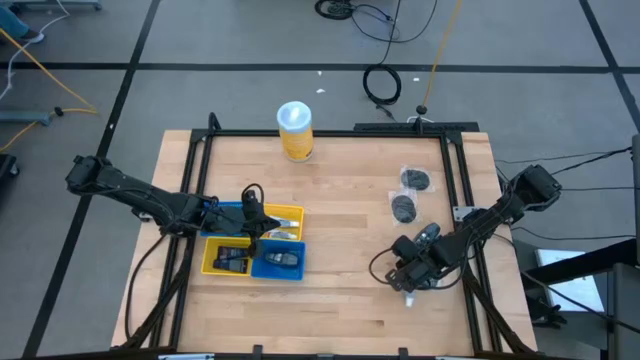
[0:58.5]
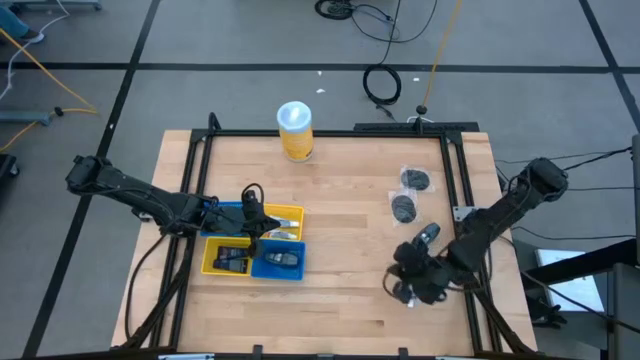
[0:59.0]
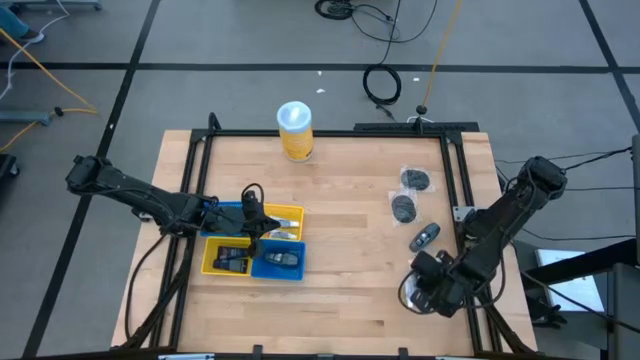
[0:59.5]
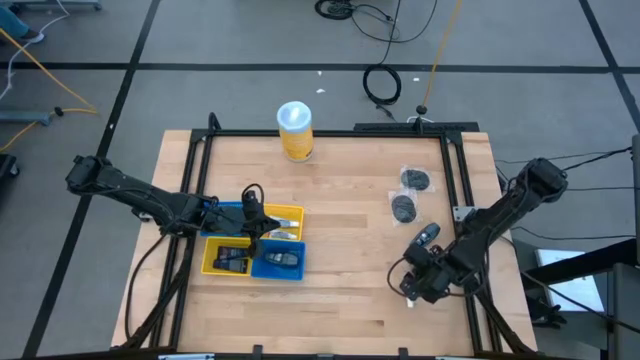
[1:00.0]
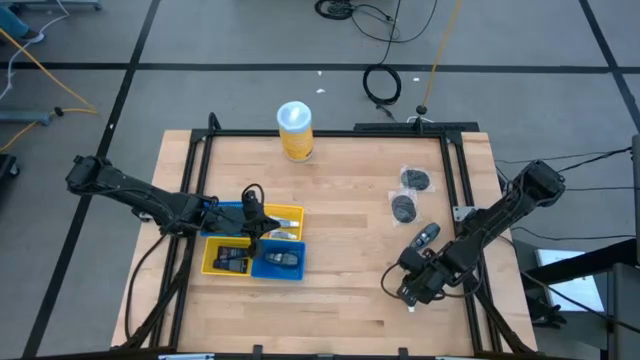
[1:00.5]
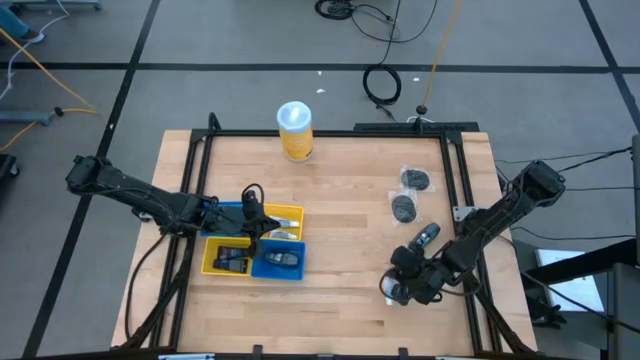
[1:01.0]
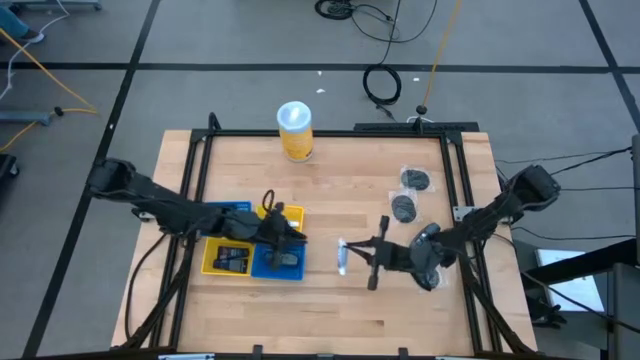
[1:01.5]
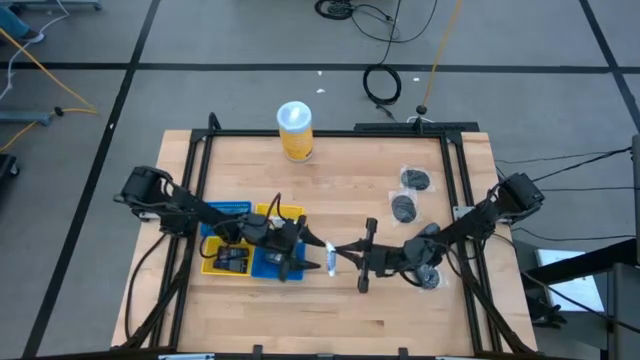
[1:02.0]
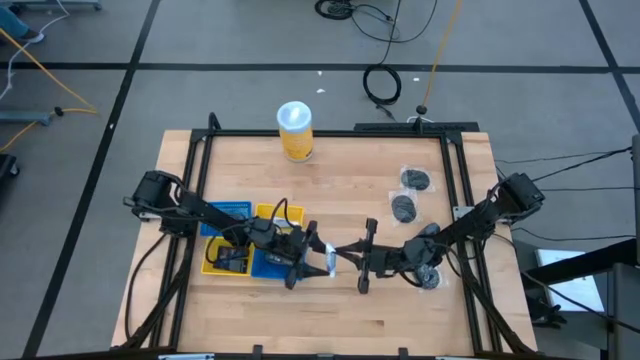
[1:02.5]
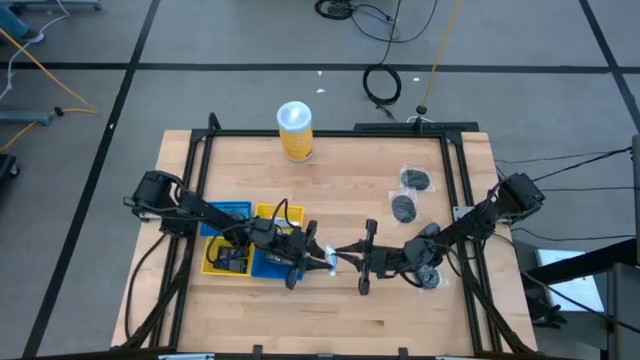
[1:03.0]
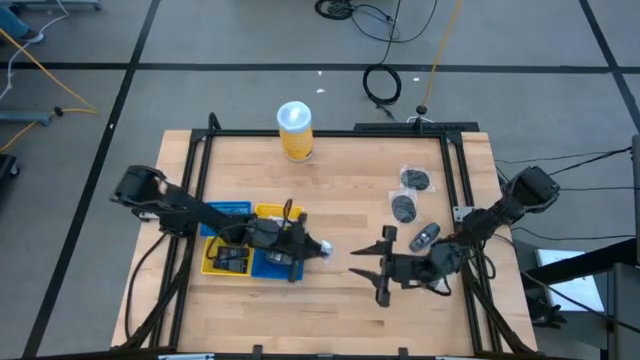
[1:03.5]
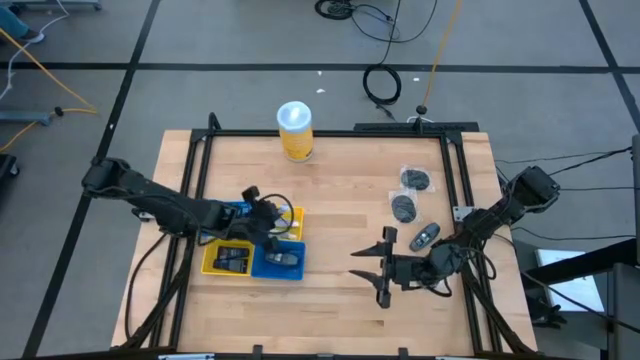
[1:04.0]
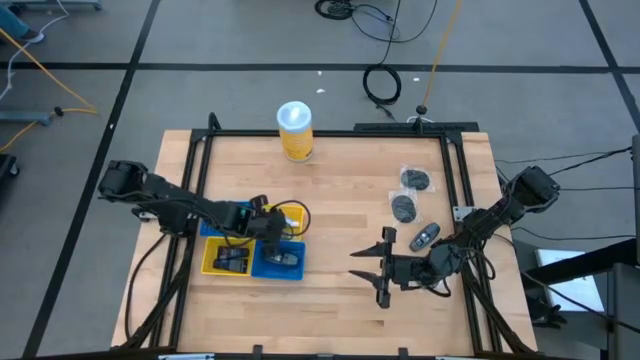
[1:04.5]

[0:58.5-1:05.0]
Task: Pick & Place Travel size toiletries
Put the white toothpaste into the top yellow bin

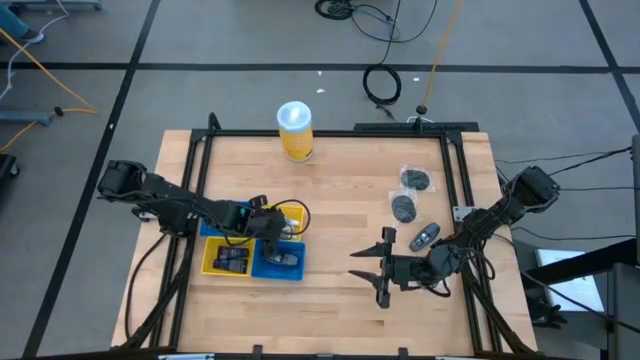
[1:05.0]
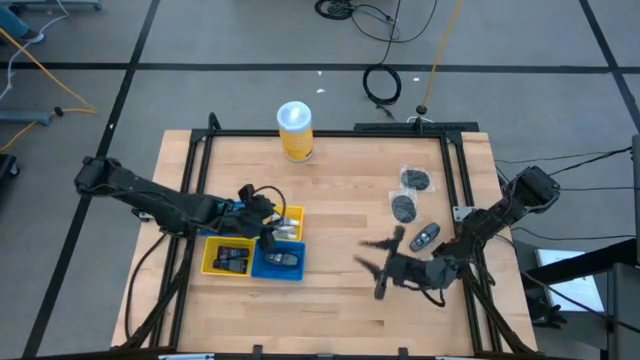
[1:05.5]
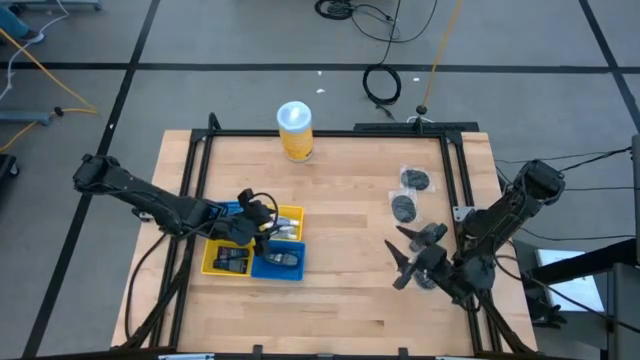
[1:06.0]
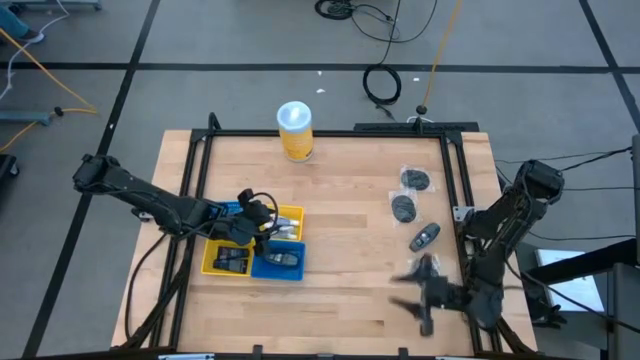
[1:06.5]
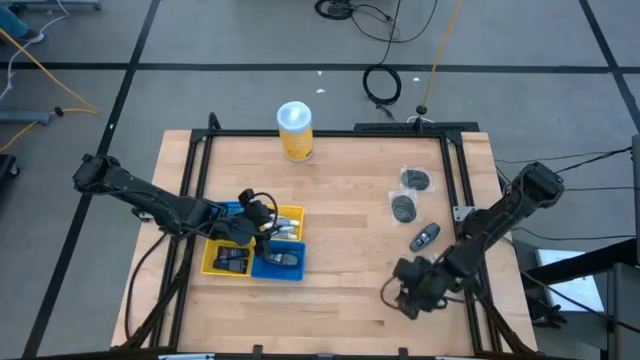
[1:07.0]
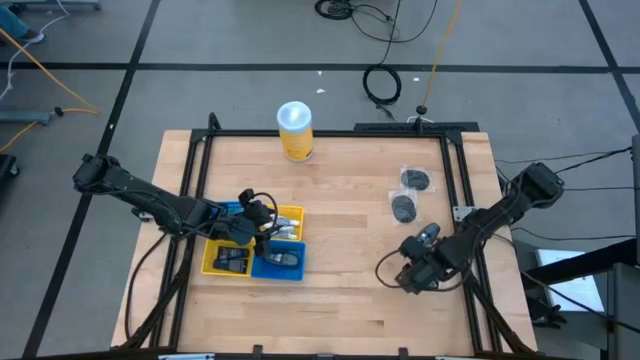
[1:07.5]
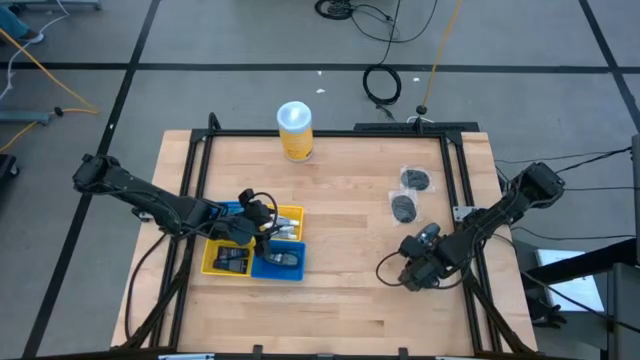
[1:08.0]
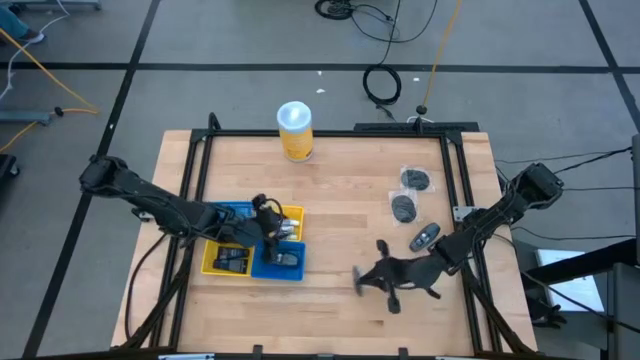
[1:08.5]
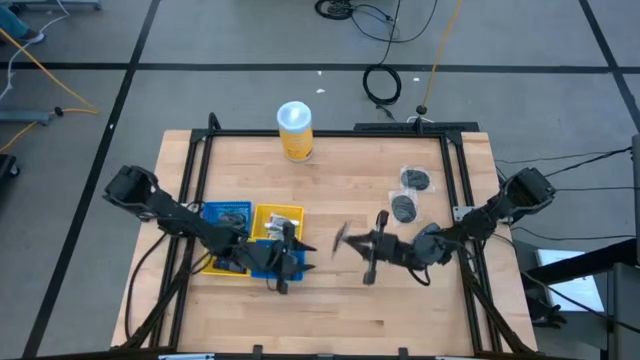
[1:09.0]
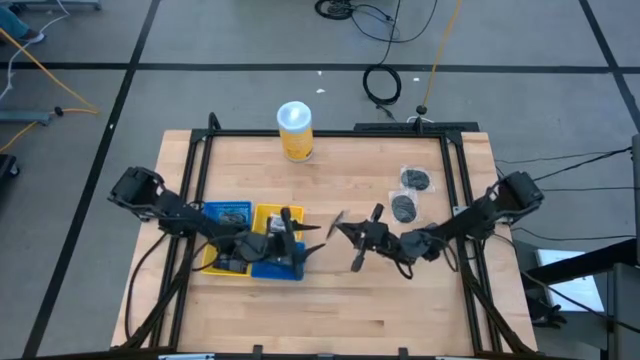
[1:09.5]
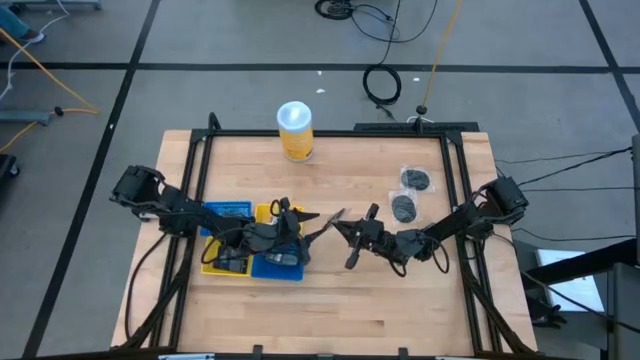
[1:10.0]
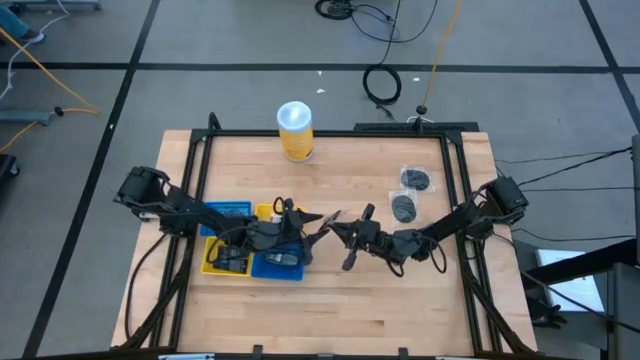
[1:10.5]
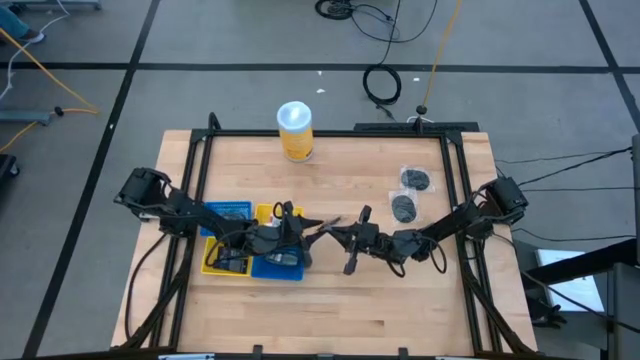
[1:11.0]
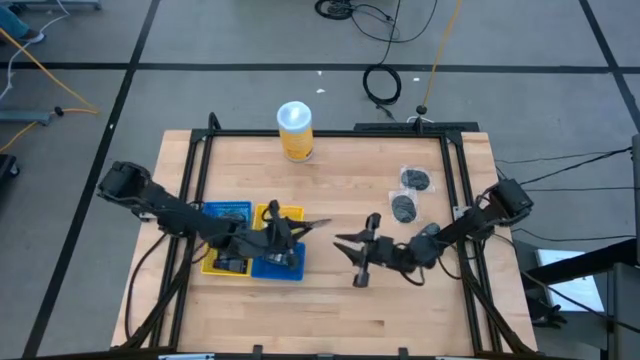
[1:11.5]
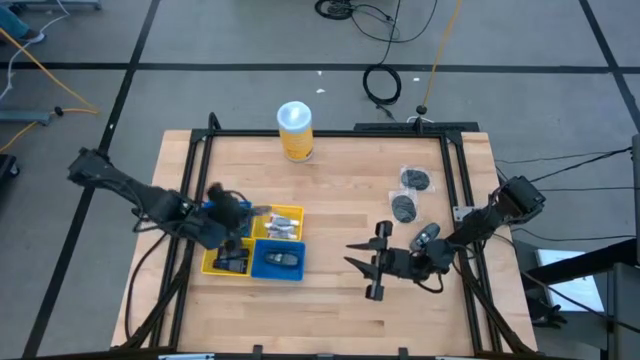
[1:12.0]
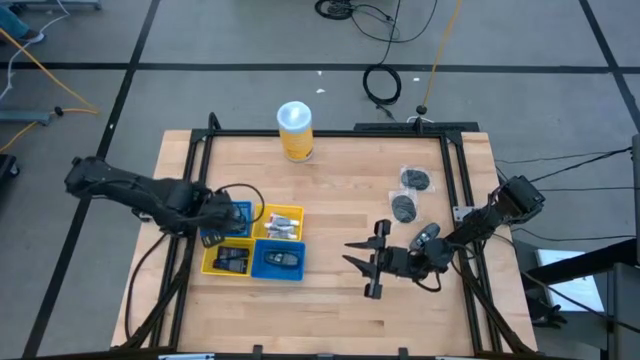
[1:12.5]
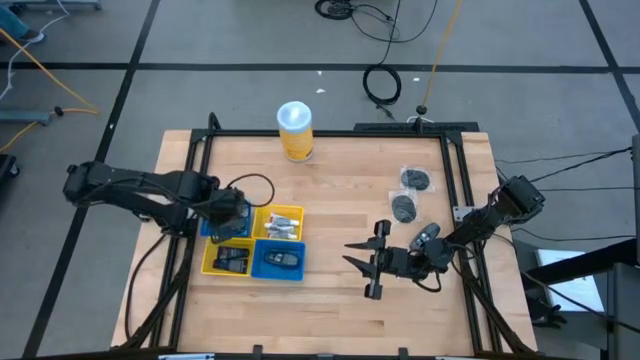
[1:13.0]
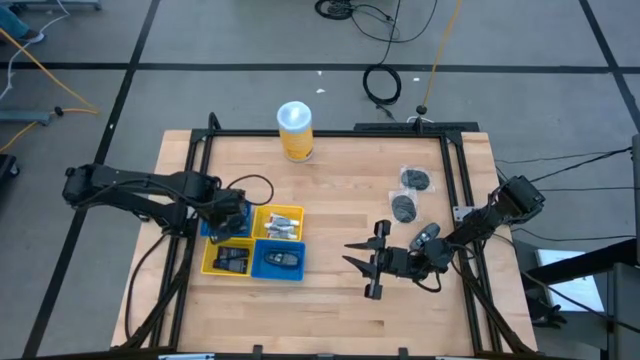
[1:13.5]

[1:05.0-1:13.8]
Put the black hairbrush into the top blue bin

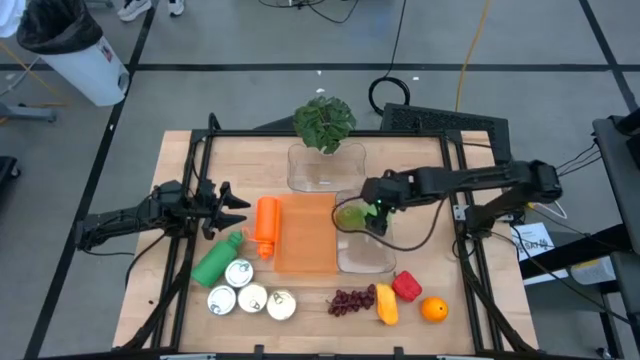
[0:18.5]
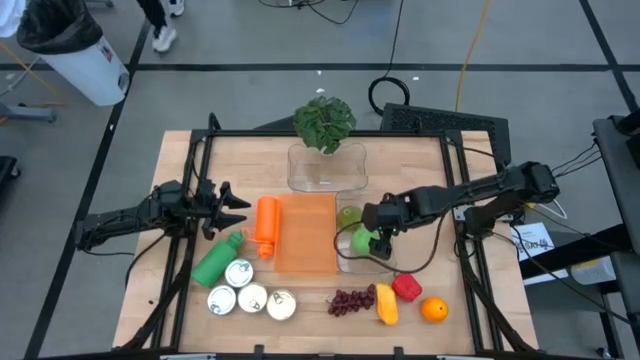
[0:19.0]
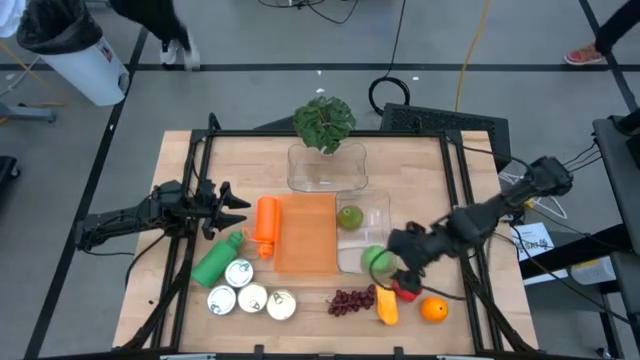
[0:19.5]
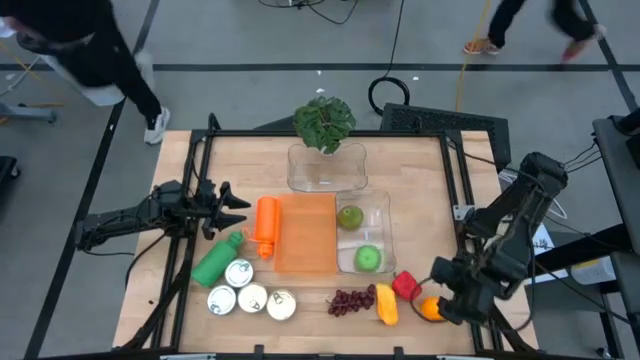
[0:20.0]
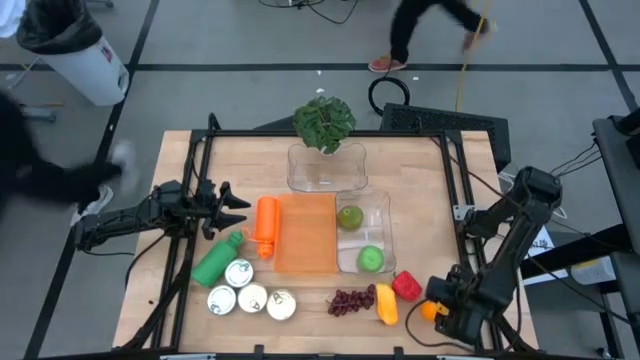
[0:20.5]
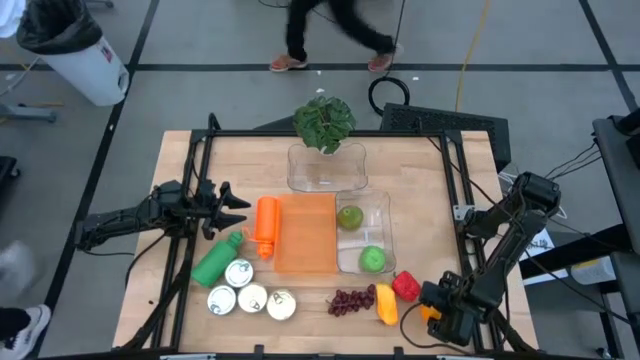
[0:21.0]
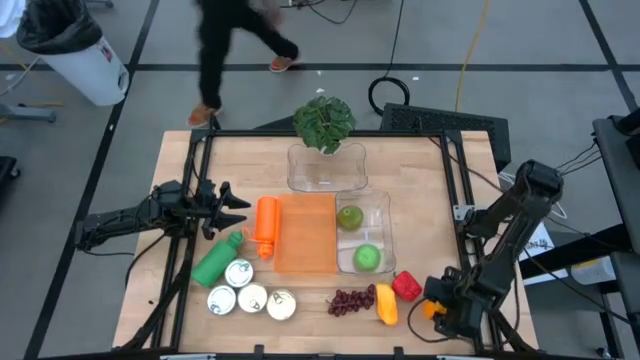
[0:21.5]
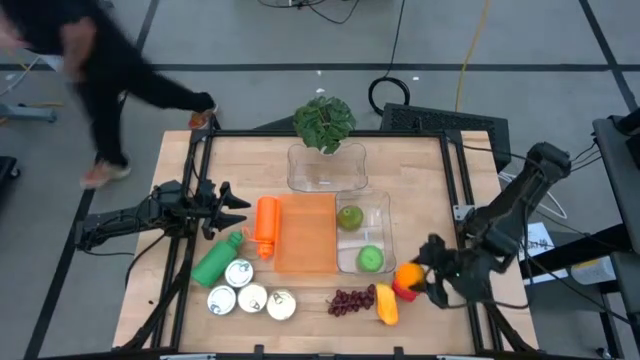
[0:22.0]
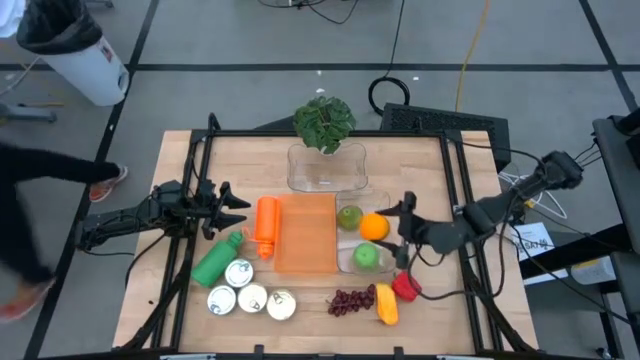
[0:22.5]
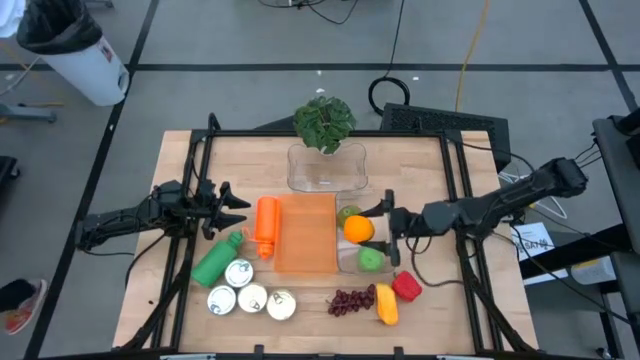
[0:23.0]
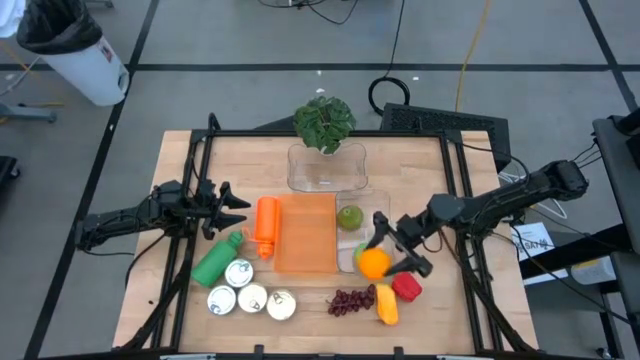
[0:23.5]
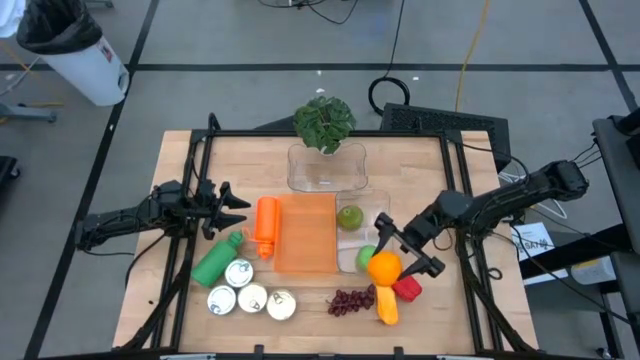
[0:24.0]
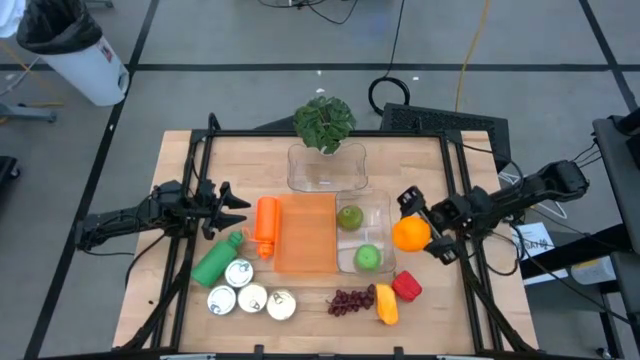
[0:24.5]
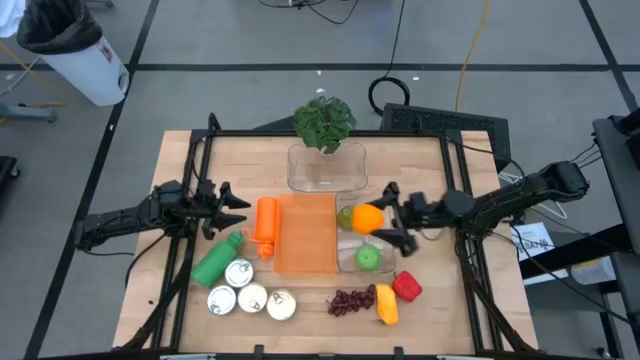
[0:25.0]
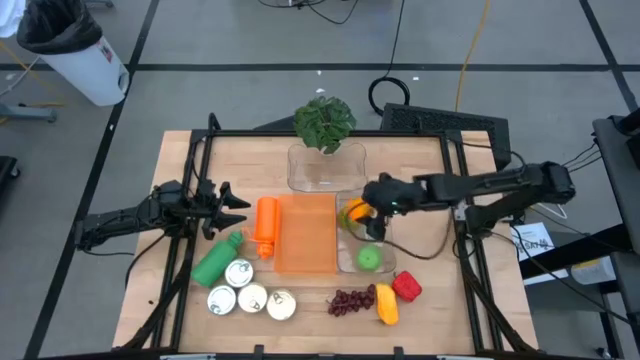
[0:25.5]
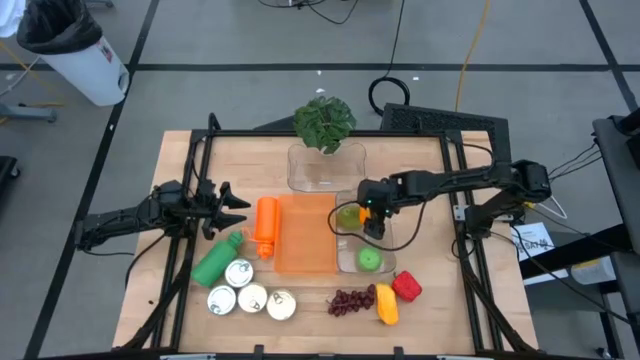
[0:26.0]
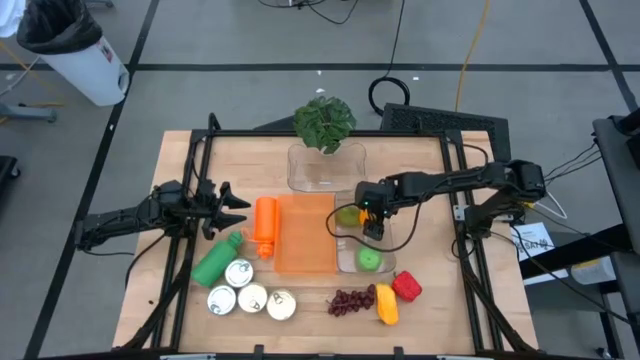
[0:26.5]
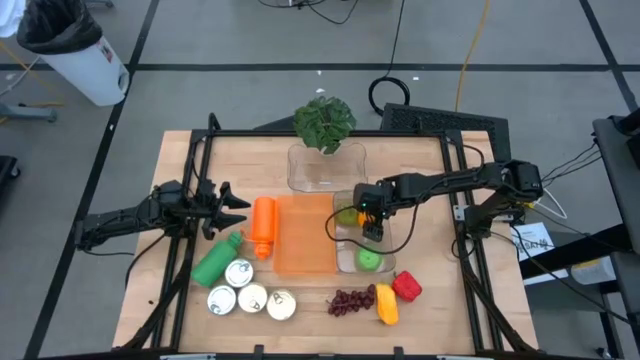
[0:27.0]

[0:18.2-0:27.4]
Task: Pick & Place Food Item
Put the orange into the bottom transparent bin
